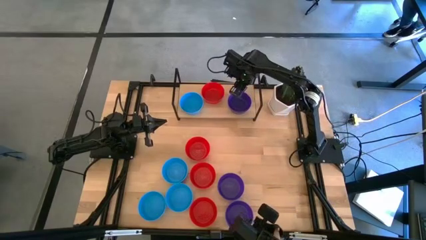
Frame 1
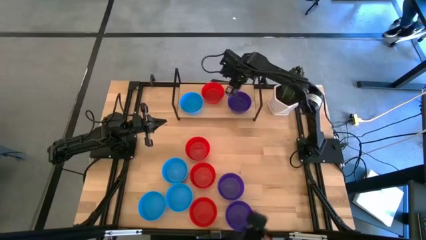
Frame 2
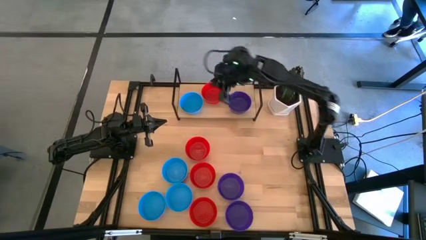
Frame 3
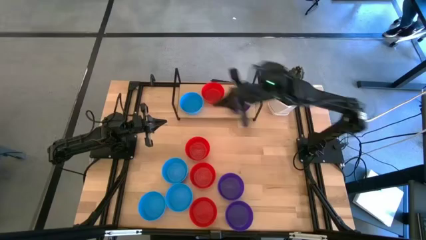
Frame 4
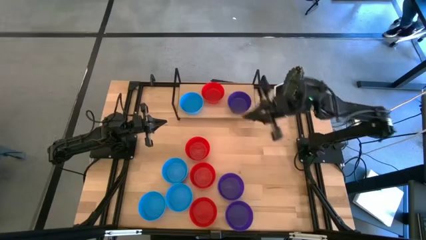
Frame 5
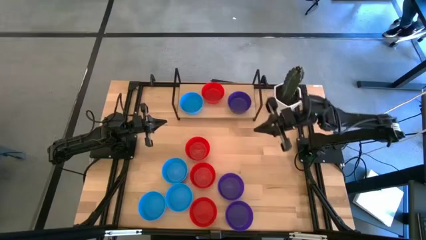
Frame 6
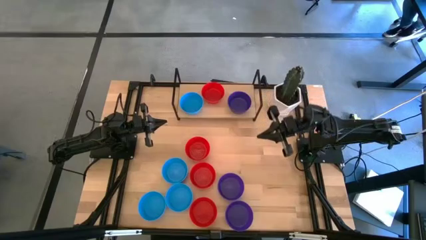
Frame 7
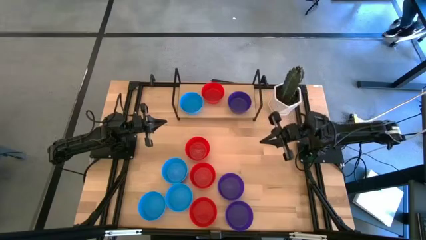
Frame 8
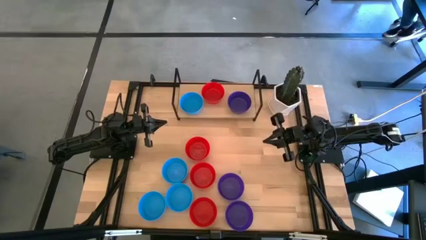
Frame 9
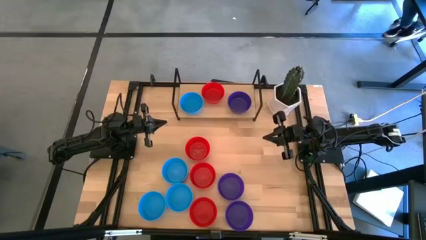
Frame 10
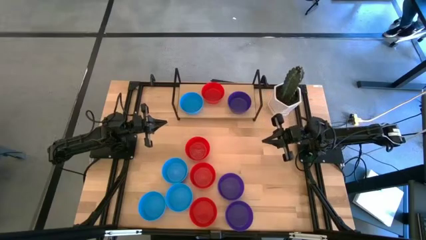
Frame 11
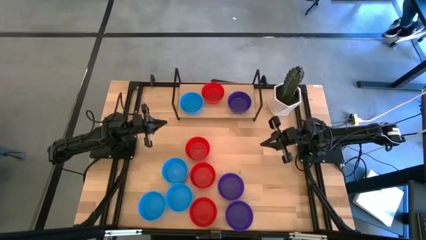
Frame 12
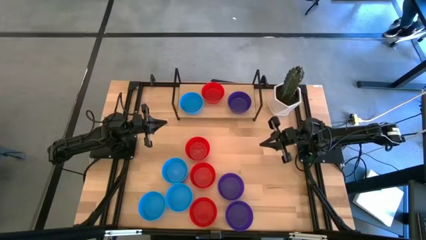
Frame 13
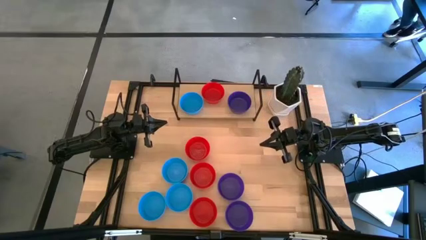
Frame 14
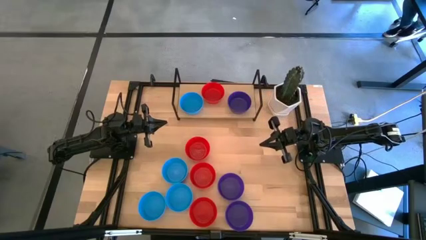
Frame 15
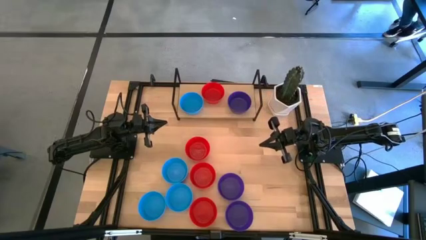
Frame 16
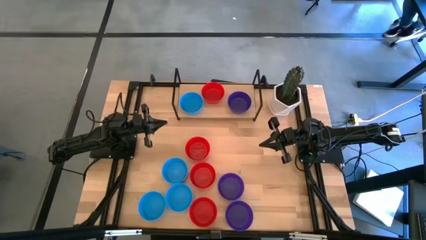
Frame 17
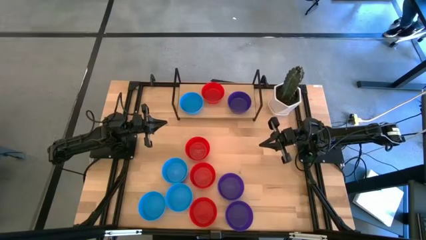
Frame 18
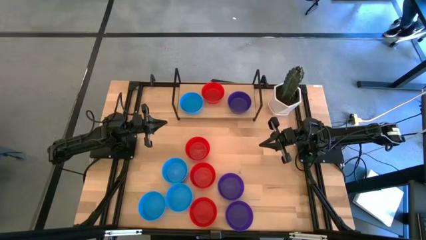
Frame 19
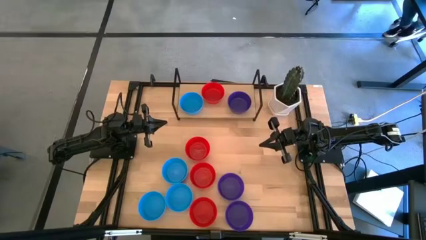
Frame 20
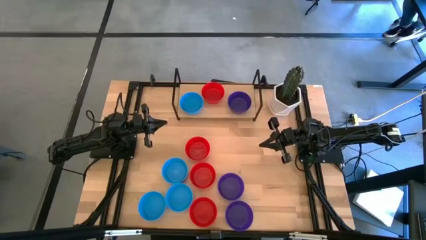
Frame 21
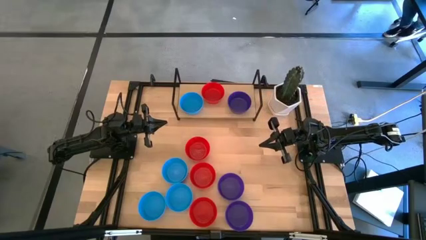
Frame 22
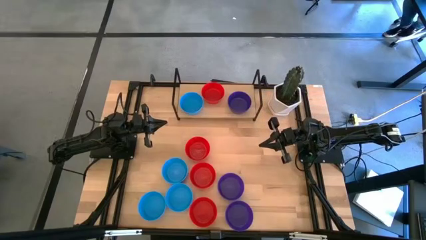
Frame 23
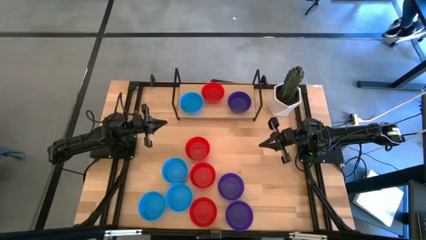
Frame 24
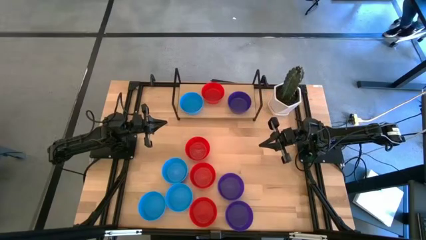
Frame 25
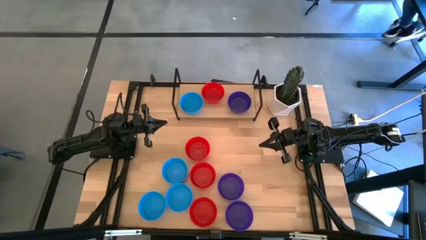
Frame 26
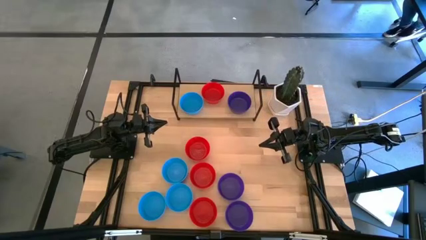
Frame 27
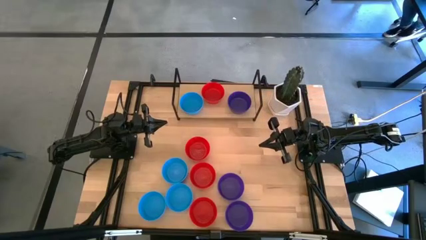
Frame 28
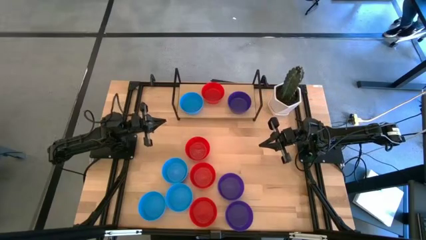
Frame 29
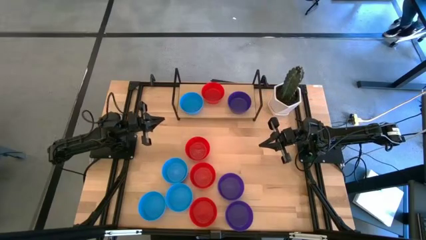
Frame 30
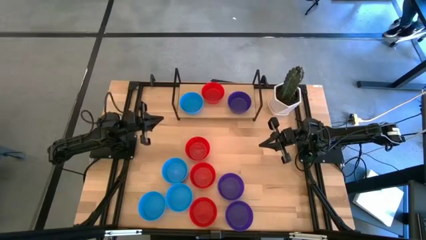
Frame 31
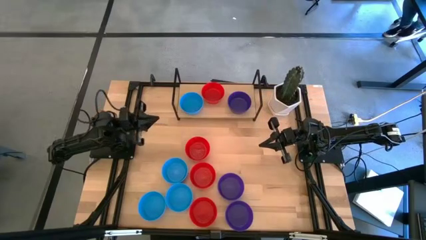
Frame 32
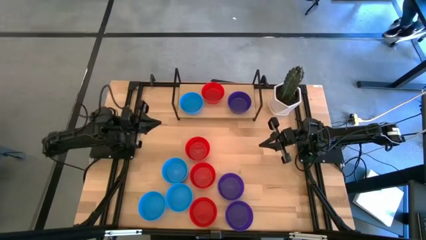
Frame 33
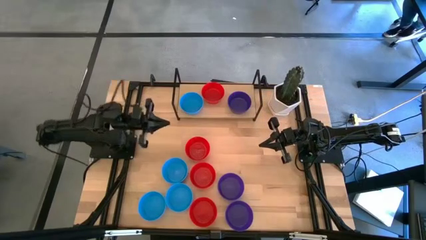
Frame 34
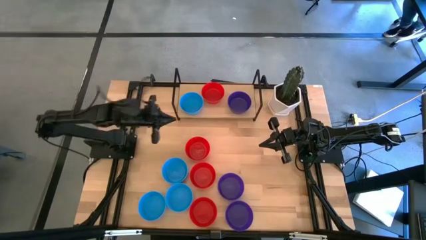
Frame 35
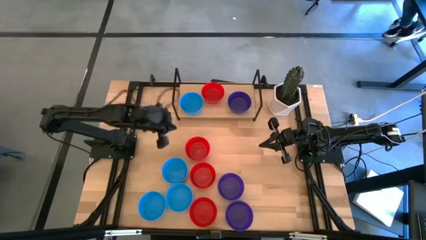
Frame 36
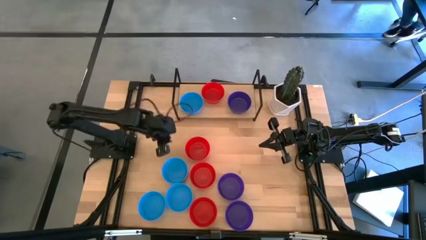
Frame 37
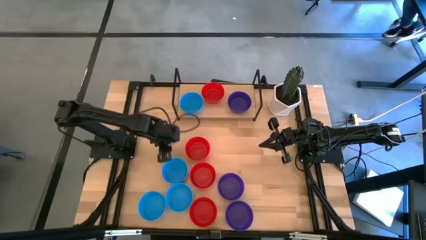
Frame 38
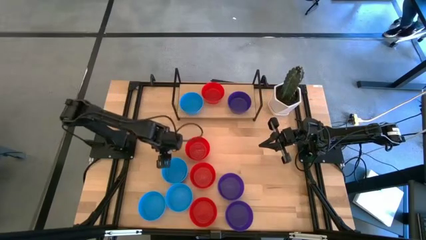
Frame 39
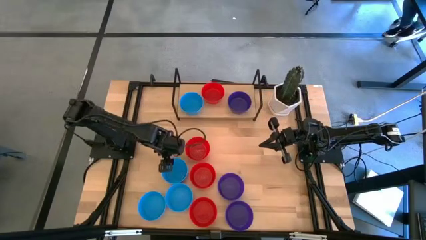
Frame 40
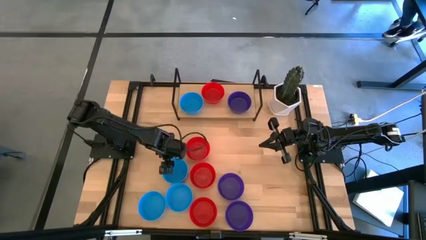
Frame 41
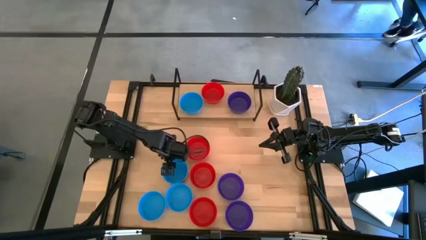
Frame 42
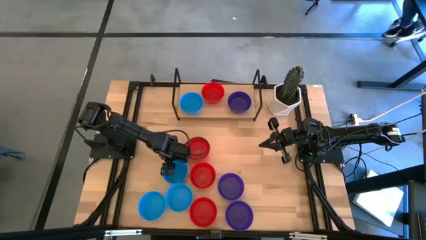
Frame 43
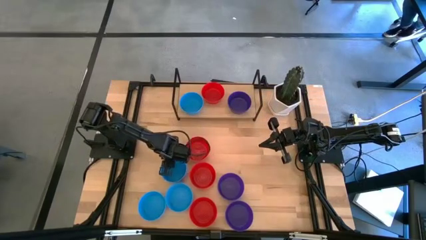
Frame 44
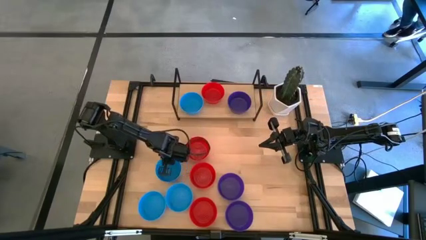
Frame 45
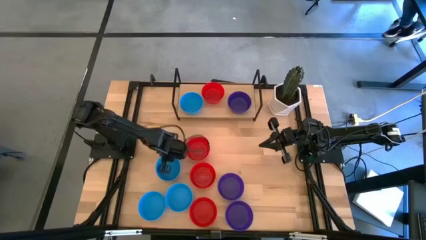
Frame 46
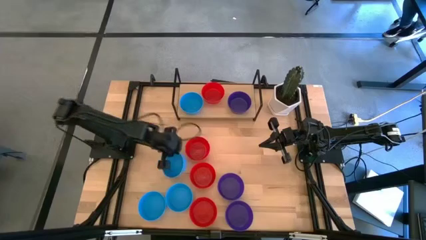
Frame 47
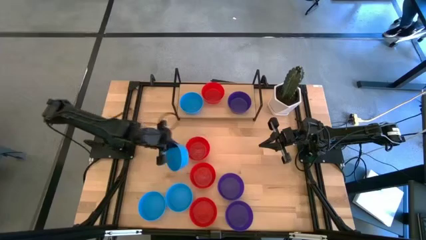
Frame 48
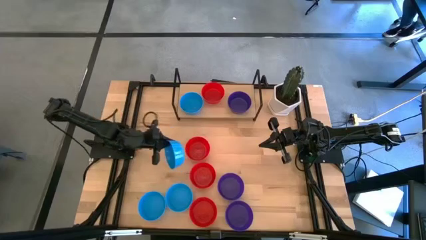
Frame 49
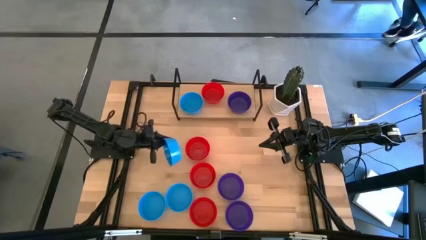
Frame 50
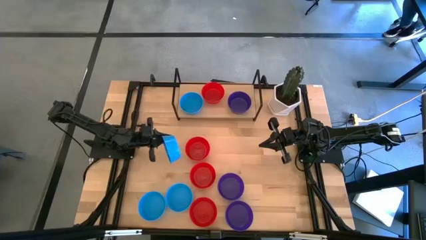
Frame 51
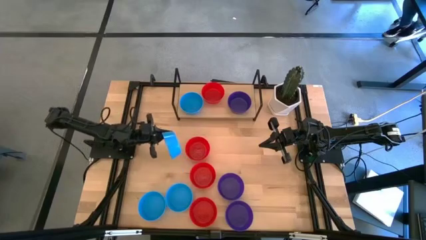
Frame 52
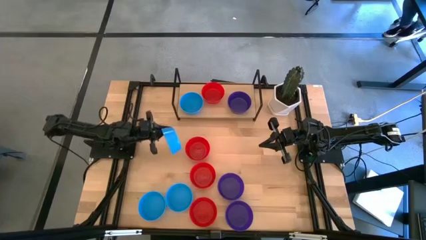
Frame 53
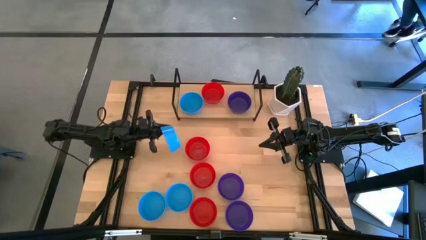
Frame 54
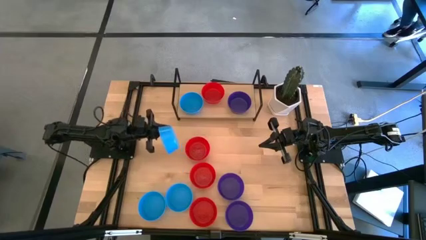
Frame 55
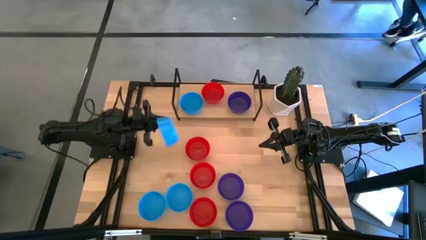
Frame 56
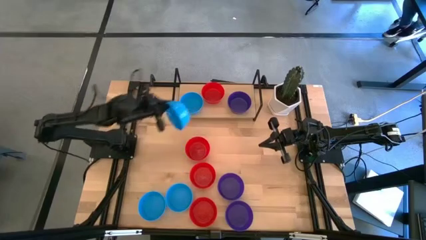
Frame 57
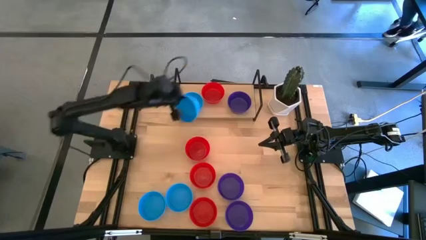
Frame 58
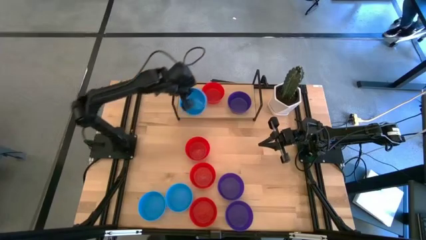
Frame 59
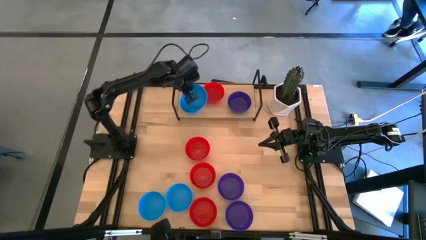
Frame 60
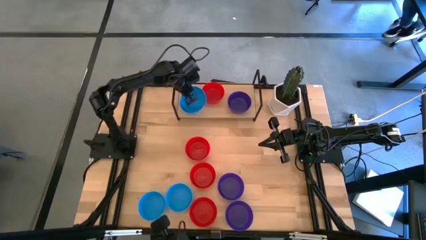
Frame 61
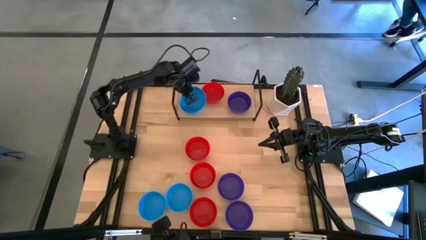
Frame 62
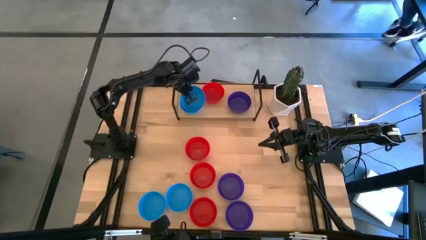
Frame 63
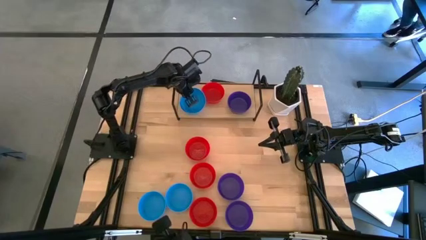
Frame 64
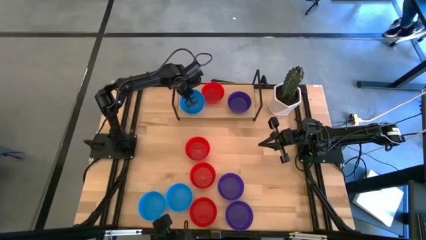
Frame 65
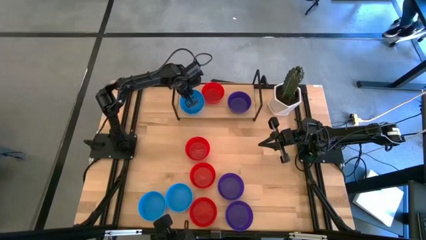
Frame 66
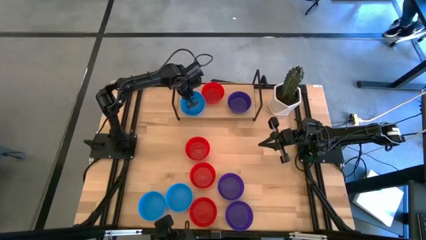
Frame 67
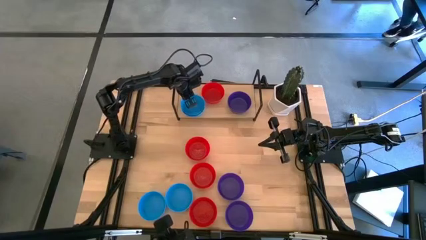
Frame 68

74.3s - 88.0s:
Task: Pick & Place Mini bowls
Stack the blue bowl on top of the blue bowl on the shelf

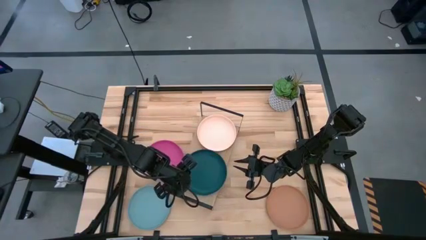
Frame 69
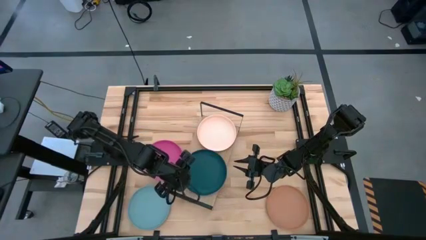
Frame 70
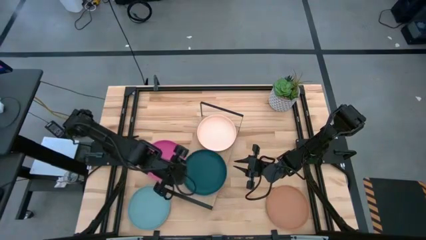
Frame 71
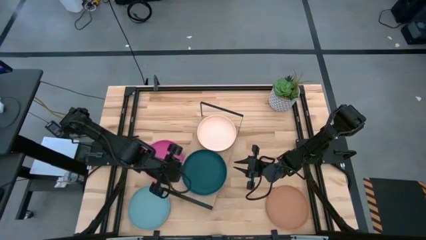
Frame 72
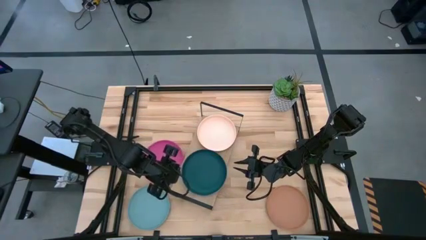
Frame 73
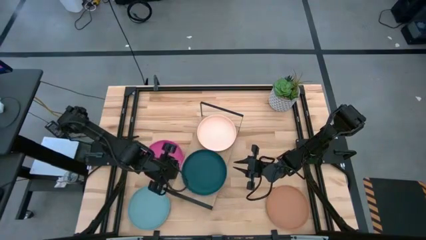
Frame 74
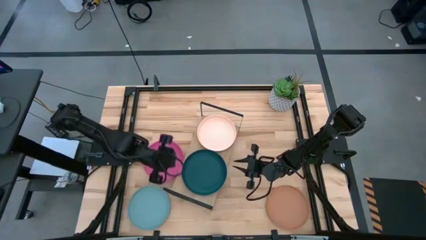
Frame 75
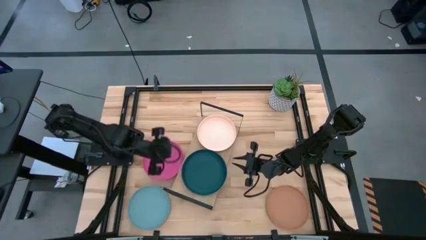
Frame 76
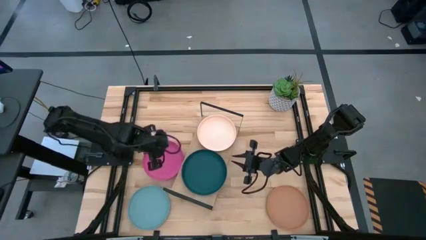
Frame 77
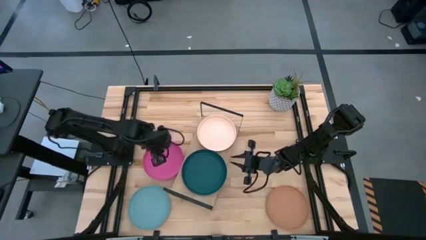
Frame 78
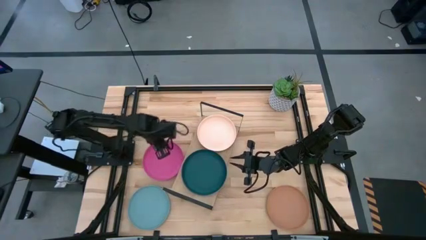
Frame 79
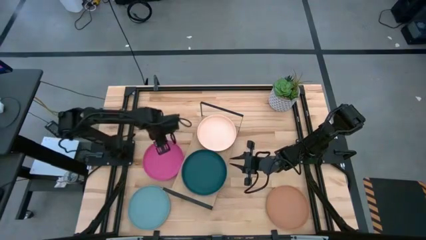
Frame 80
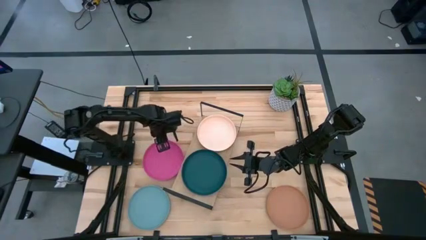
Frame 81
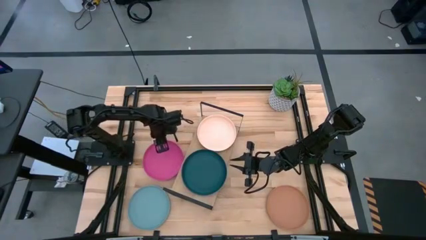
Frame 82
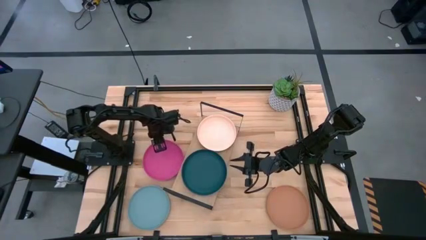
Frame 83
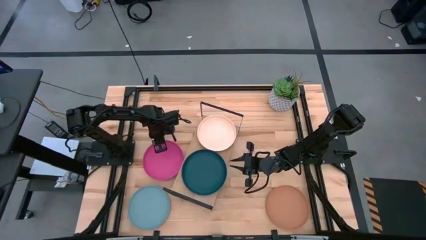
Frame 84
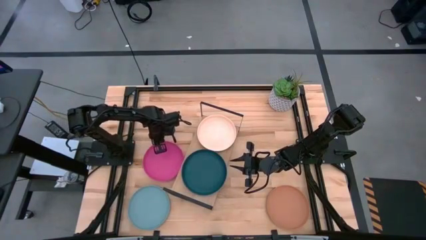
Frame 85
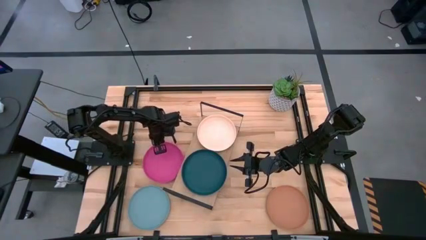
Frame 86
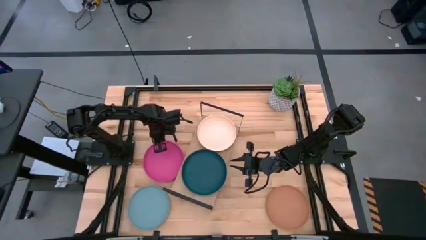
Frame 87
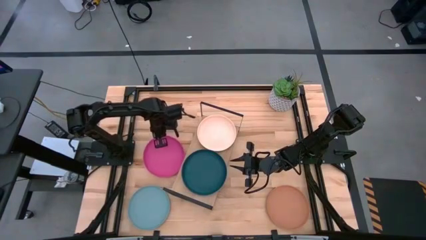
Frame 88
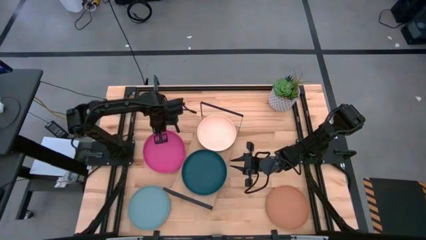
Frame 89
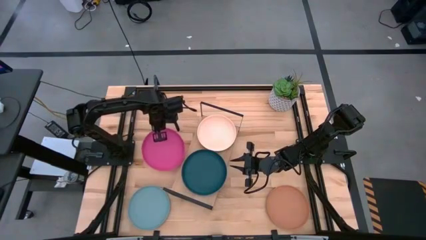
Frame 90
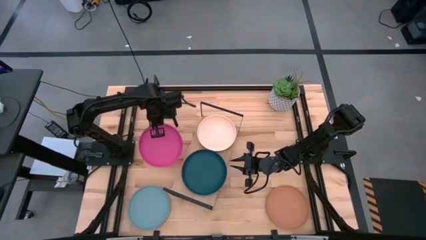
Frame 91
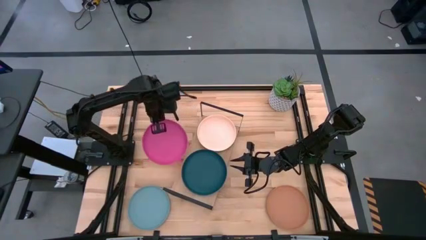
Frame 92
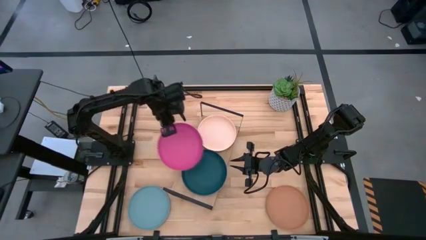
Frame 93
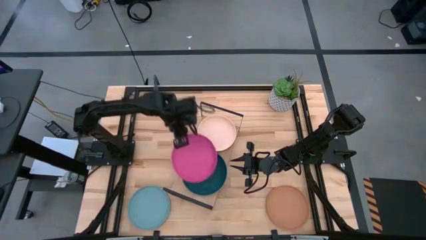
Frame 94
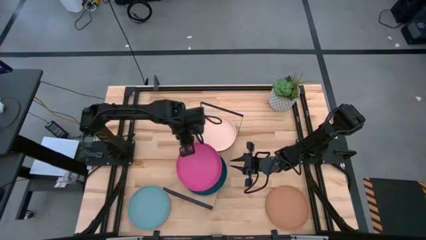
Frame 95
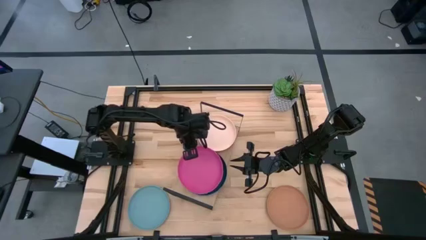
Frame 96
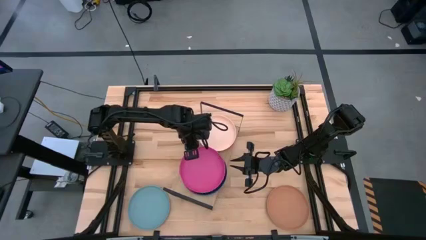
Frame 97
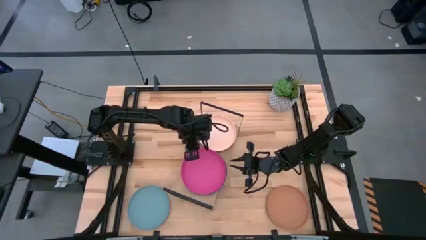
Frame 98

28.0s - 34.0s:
Task: Place and stack plates onto a shelf
Stack the pink plate on top of the dark blue plate on the shelf
